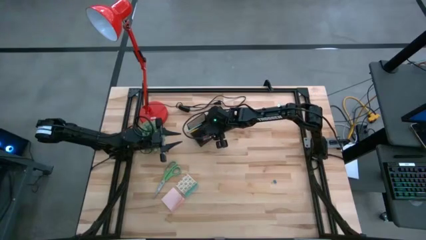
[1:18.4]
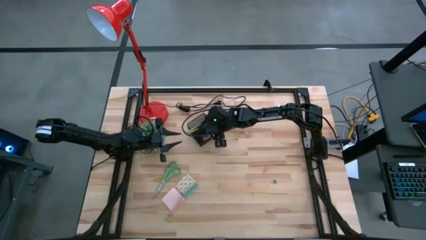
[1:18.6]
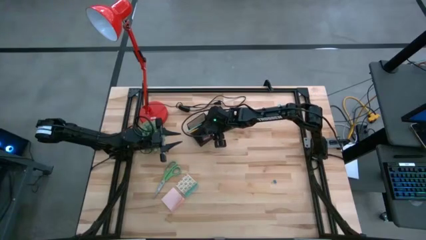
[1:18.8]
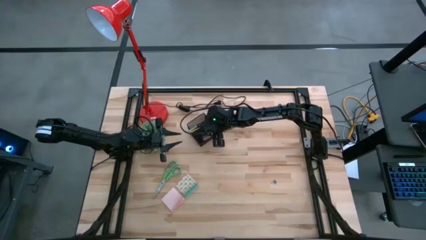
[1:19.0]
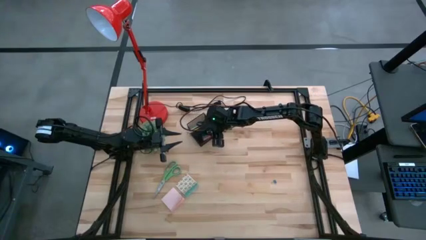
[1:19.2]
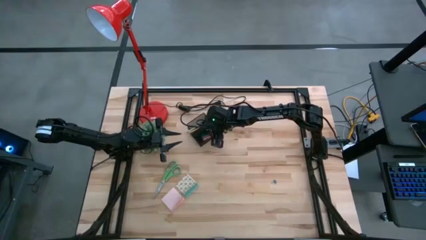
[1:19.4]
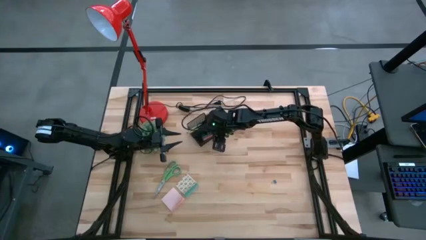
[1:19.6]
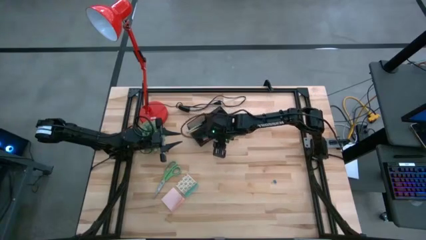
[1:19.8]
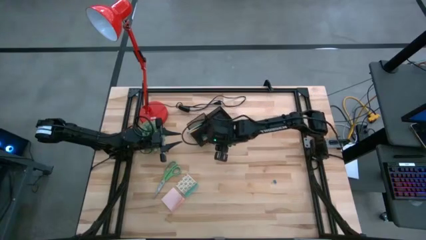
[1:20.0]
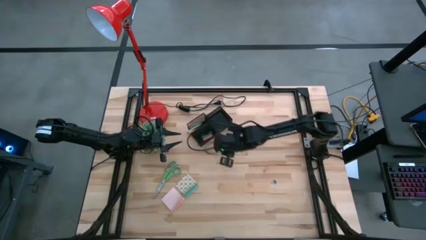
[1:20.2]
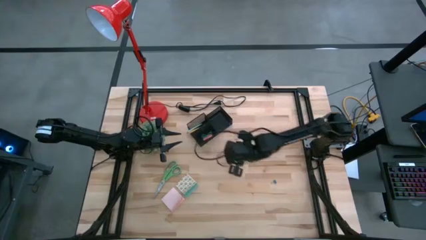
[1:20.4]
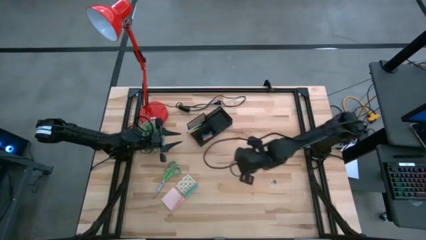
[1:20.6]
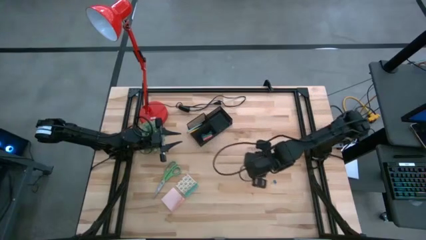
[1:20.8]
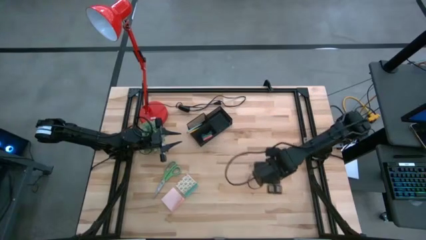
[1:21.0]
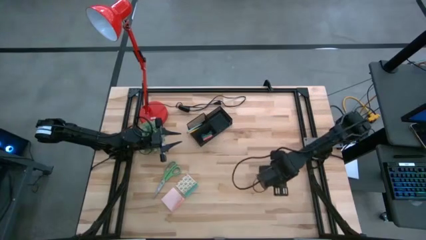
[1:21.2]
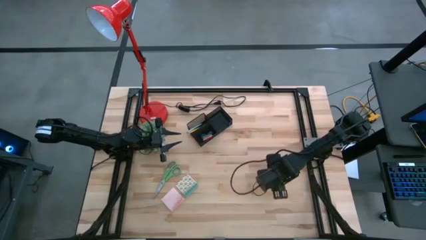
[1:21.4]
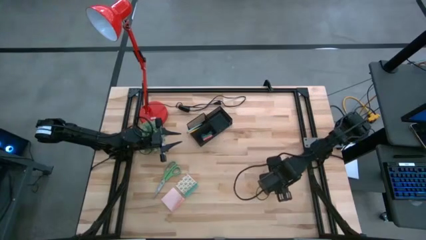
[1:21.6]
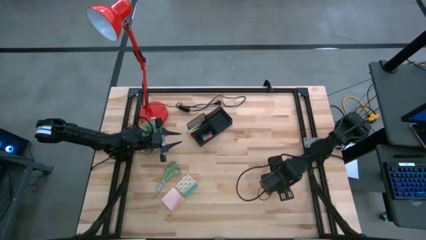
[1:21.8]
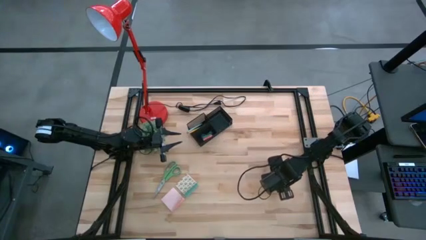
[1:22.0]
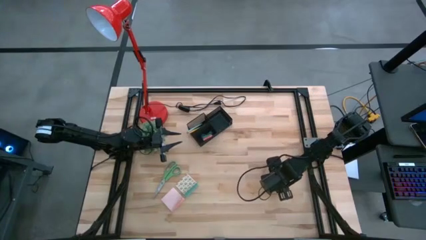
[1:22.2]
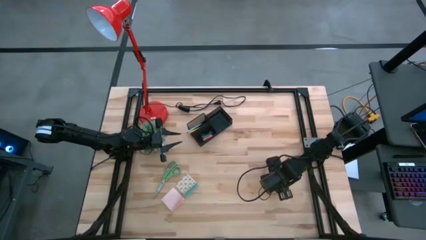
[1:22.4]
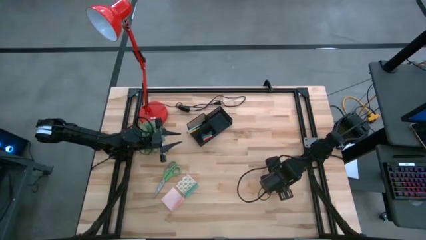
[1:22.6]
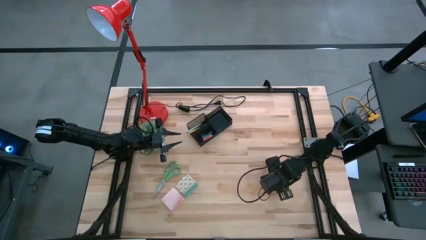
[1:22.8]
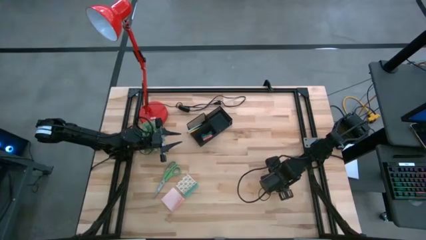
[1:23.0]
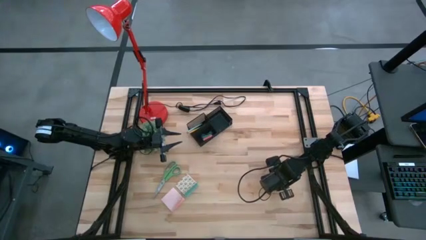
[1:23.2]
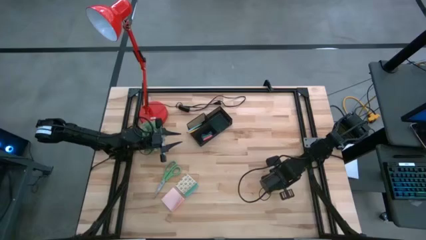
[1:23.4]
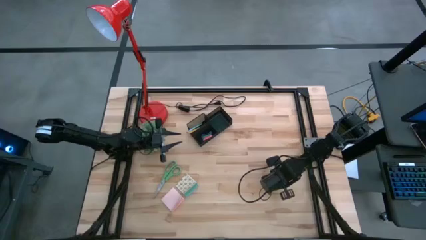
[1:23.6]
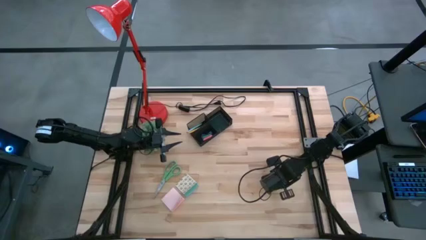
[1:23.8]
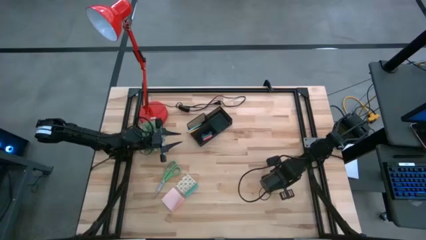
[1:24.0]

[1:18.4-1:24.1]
Task: Pick and place office supplies into organizer
Put the blue binder clip into the black desk organizer

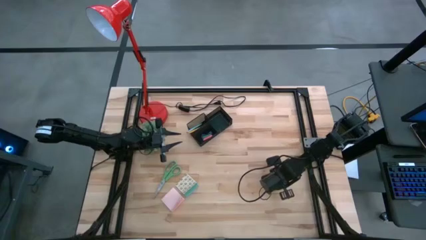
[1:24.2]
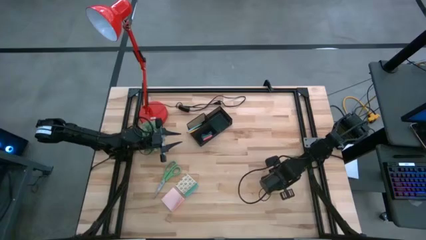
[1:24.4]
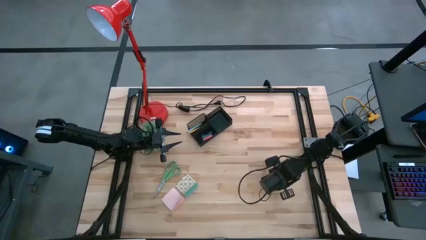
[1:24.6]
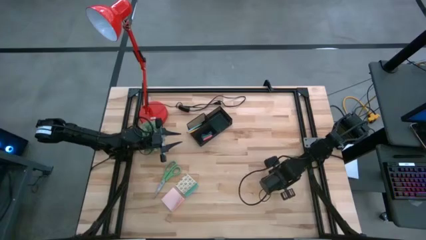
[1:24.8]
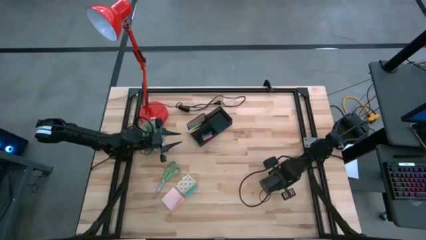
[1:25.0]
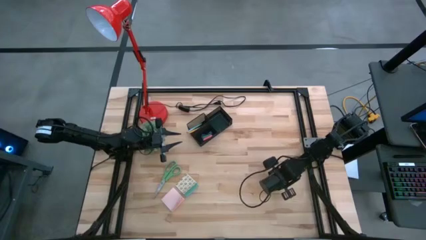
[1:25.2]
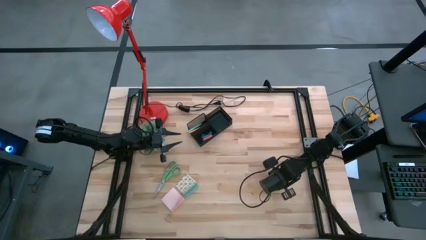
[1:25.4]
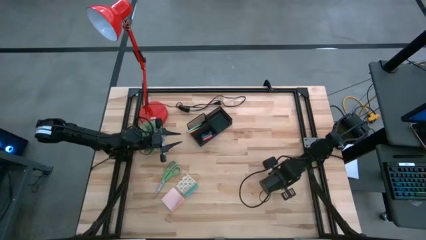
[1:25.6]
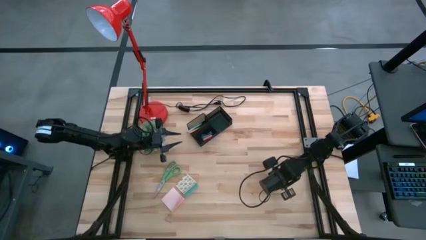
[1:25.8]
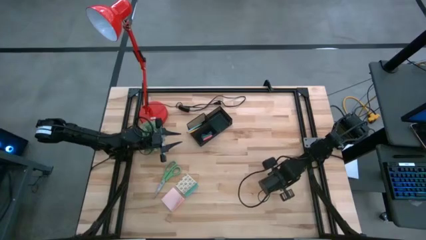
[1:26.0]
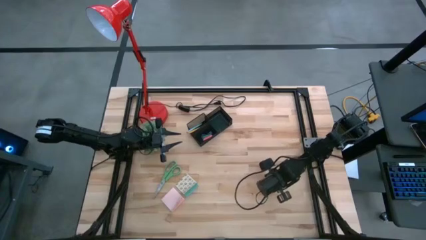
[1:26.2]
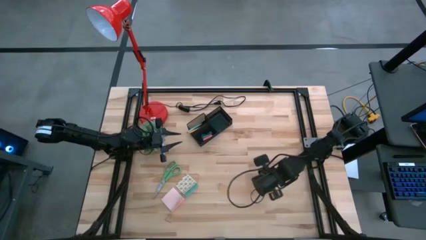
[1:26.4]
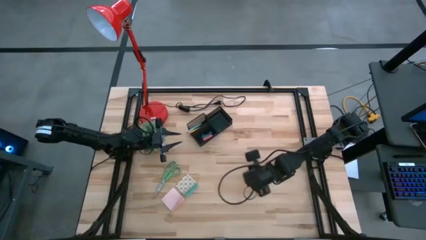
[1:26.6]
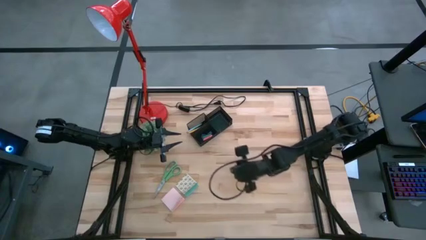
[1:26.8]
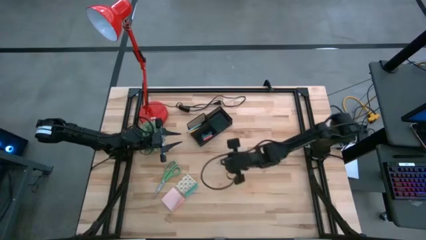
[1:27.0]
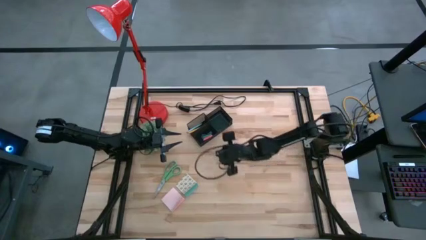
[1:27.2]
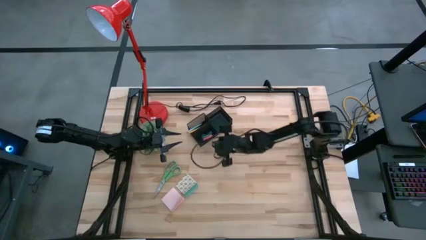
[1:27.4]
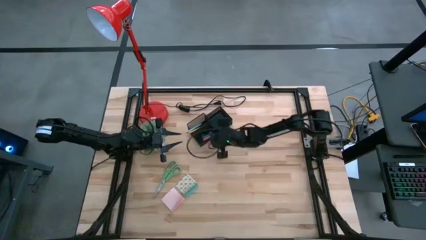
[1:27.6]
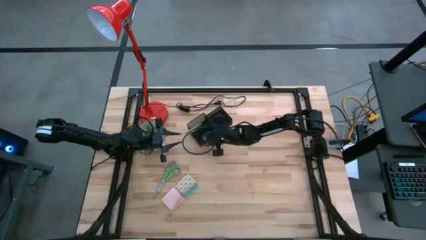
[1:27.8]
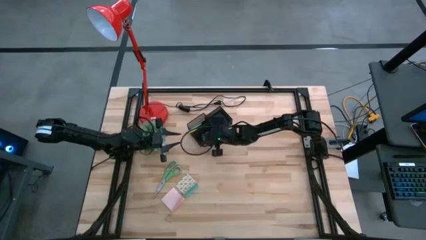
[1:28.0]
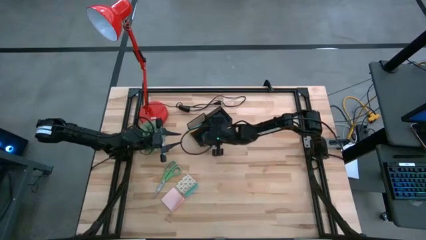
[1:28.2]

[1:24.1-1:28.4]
Put the blue binder clip into the black desk organizer
